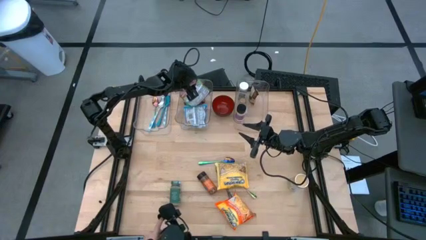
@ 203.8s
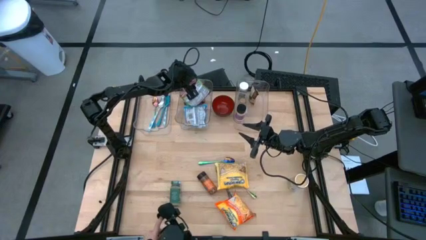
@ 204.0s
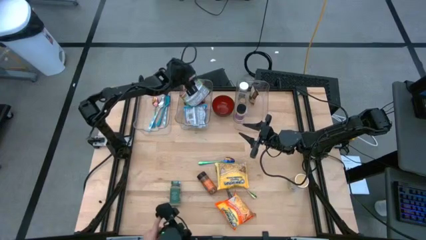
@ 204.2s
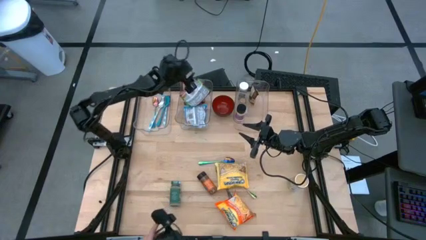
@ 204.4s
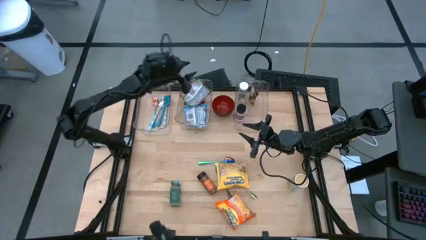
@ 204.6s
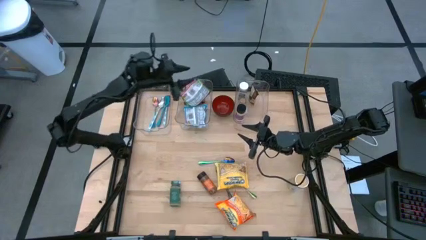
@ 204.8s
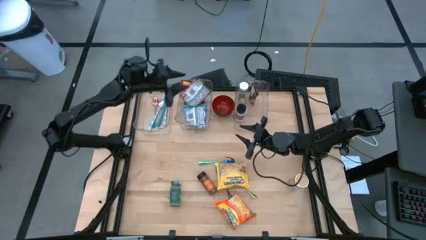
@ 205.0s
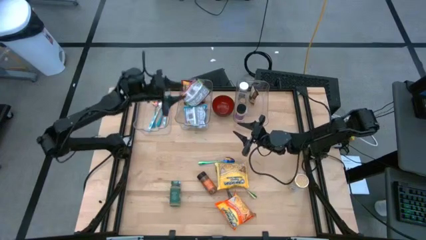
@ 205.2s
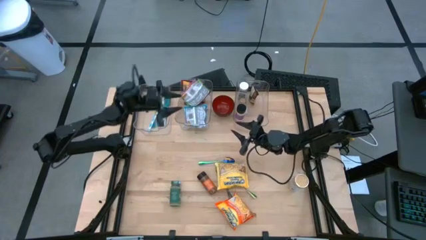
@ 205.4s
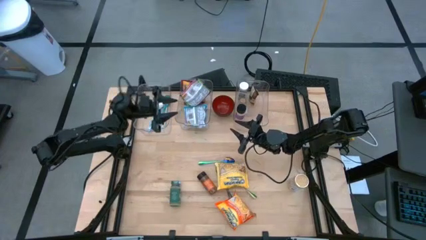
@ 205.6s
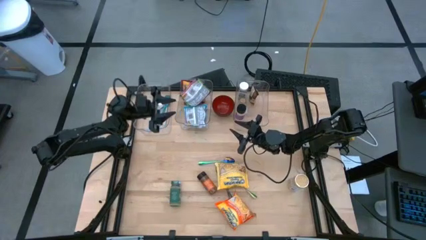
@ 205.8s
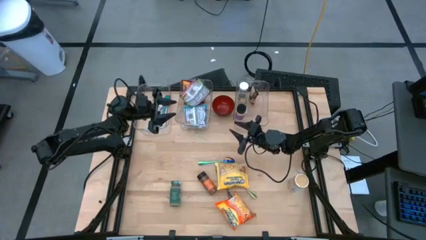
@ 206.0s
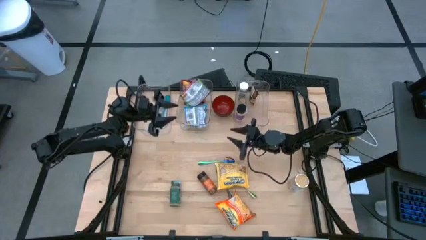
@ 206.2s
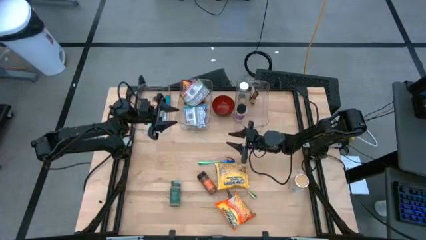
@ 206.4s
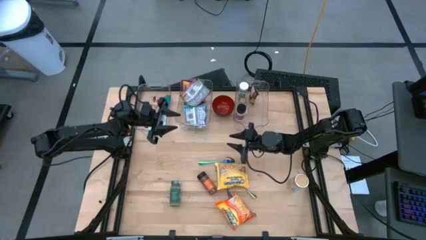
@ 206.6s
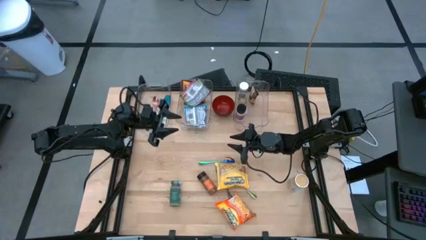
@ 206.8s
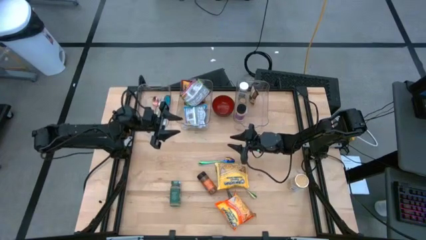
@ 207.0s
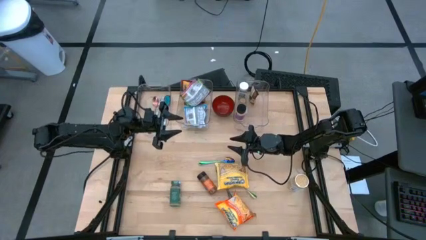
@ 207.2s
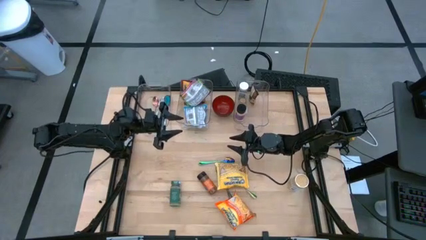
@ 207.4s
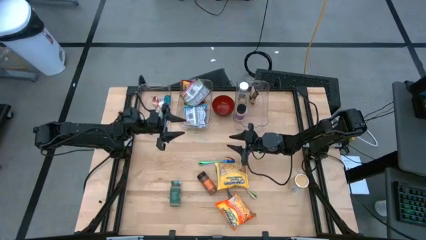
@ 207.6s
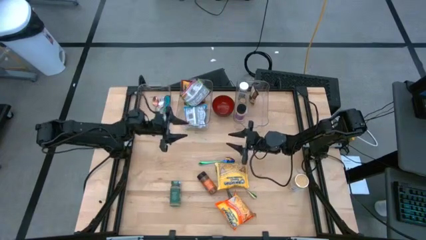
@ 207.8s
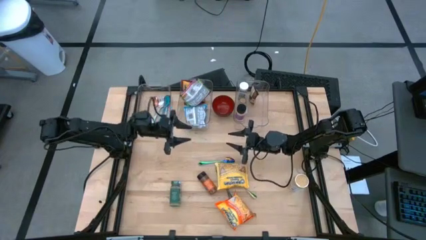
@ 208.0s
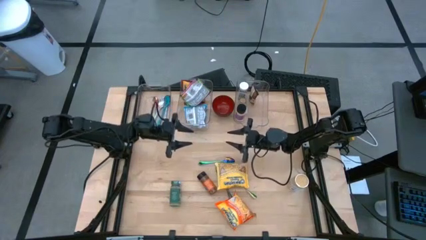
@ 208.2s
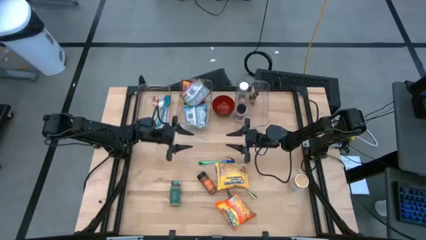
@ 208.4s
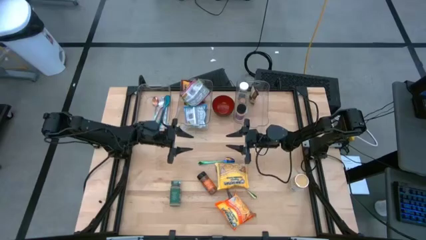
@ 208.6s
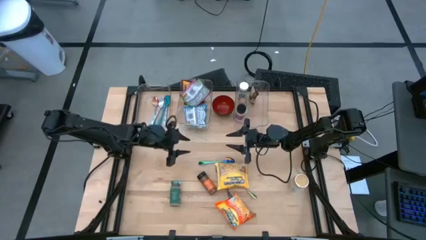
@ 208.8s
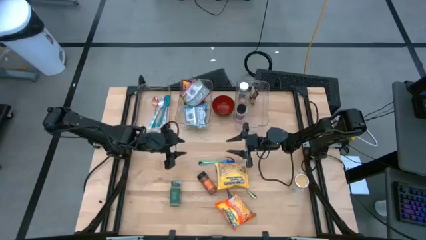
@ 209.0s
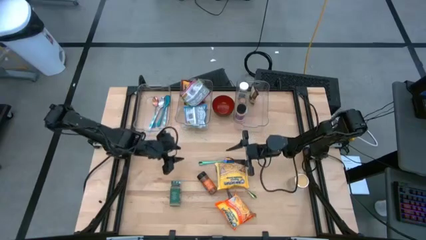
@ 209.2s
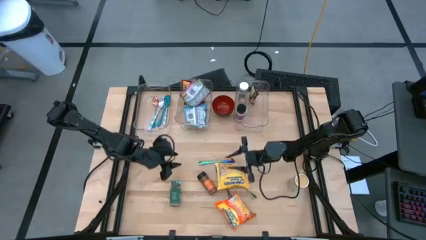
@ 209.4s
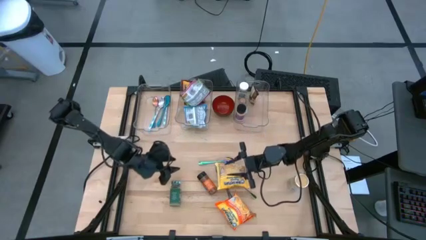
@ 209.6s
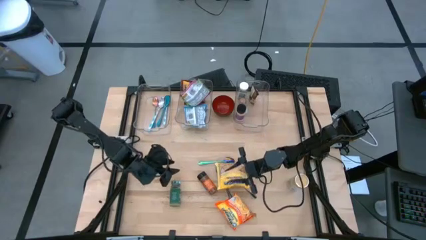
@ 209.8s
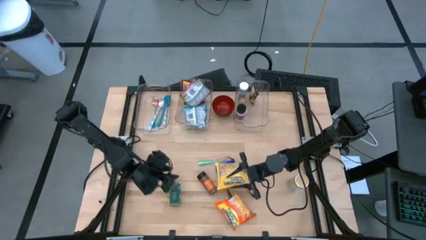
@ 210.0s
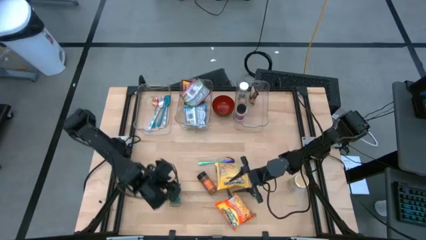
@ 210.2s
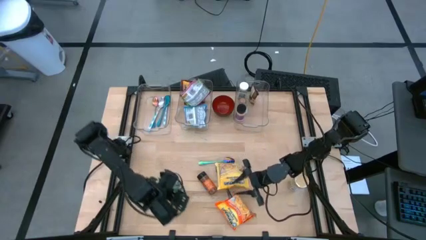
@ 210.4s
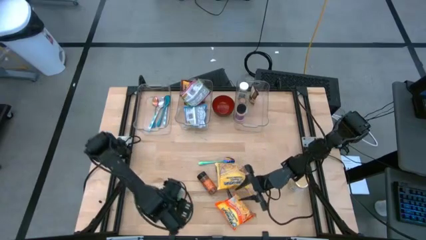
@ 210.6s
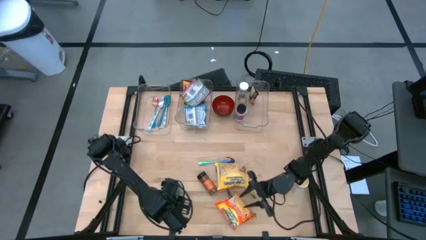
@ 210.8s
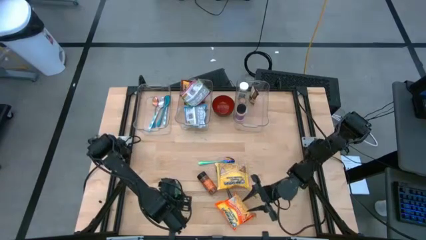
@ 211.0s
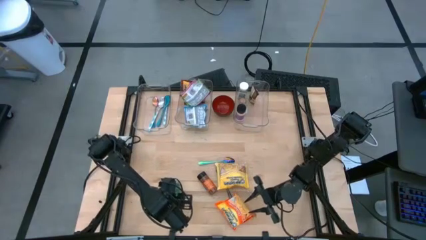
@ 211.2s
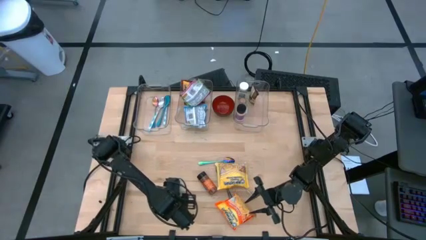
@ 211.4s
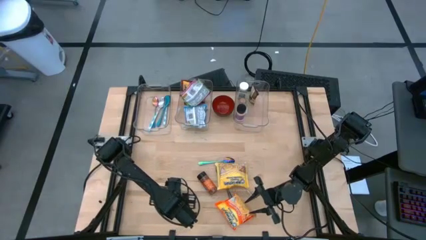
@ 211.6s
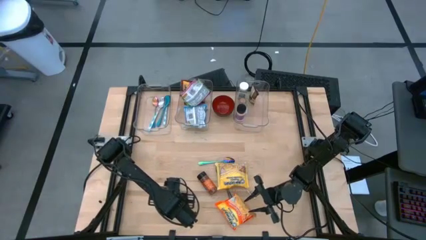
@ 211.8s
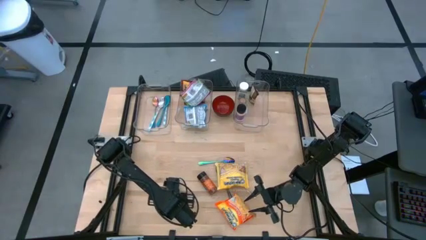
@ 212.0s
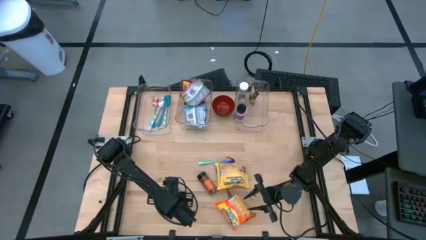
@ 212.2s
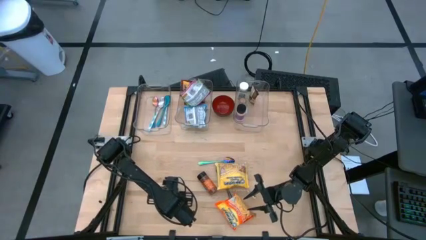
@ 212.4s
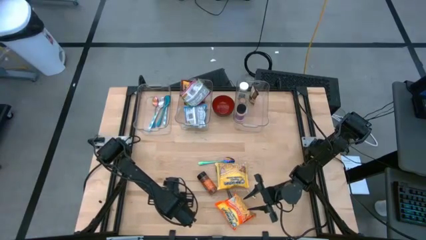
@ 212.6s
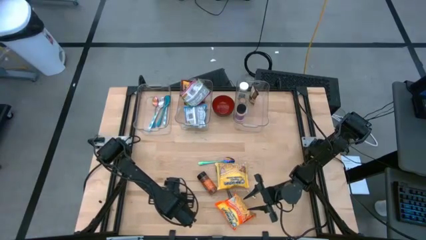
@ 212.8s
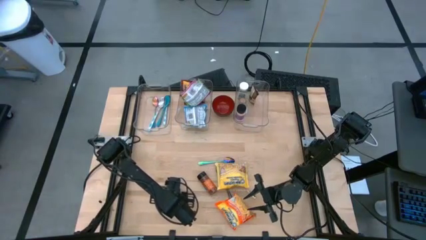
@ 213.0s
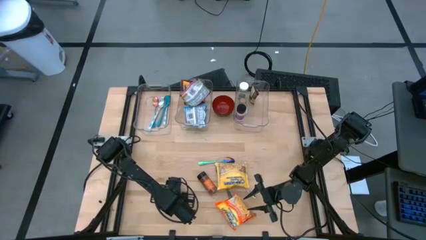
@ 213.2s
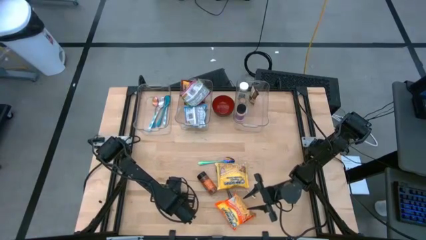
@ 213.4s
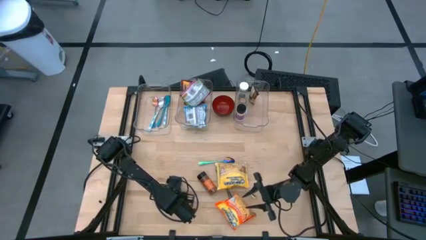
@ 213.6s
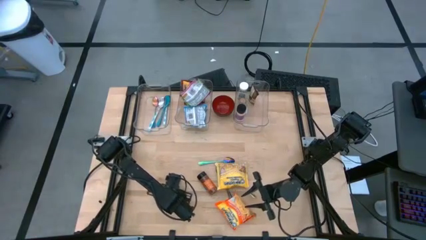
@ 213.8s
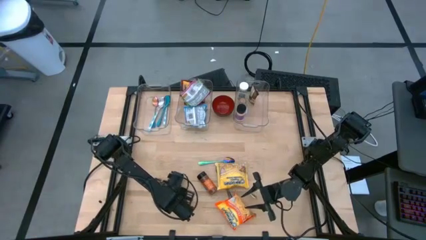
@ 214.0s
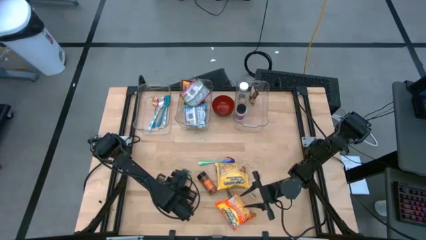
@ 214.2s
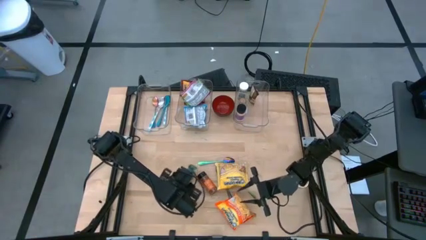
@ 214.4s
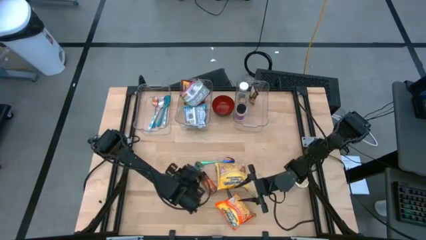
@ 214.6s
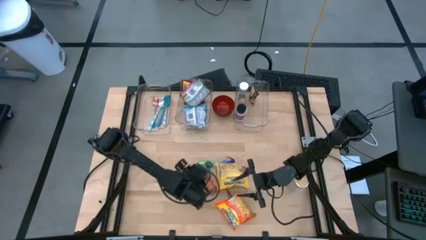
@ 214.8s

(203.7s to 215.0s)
Task: Pick & Place Food Item
Put the green seasoning bottle into the right transparent bin

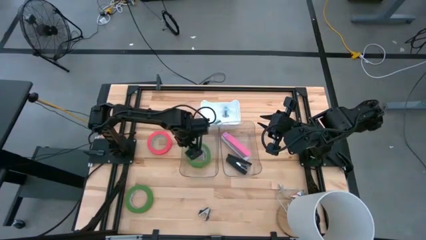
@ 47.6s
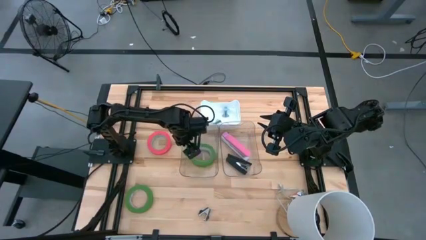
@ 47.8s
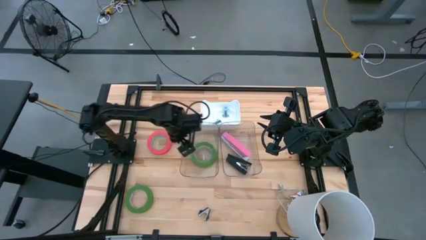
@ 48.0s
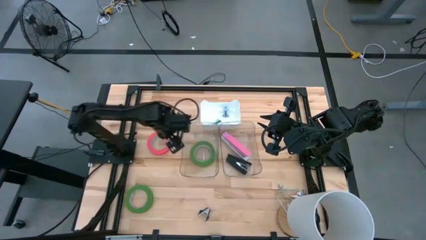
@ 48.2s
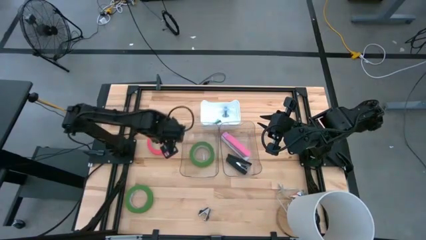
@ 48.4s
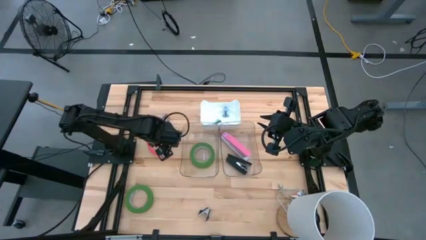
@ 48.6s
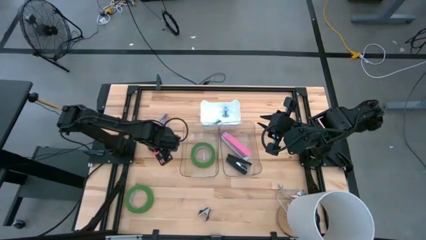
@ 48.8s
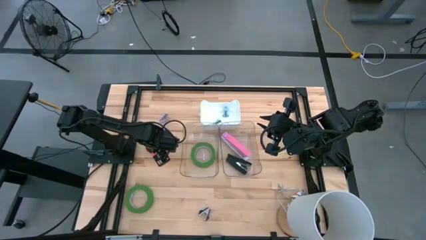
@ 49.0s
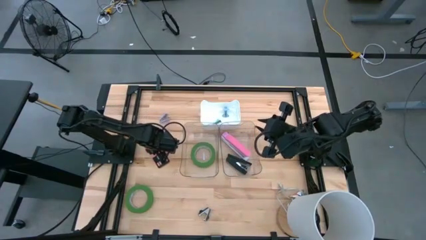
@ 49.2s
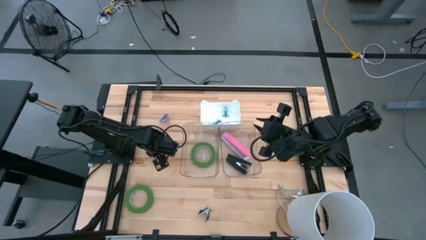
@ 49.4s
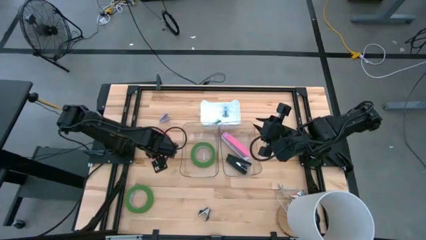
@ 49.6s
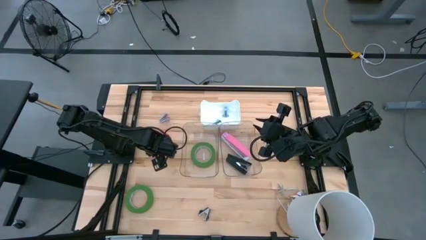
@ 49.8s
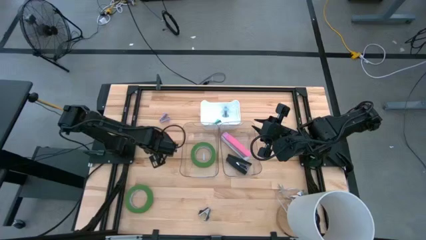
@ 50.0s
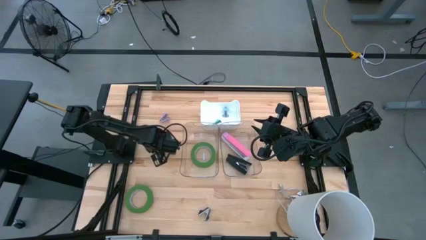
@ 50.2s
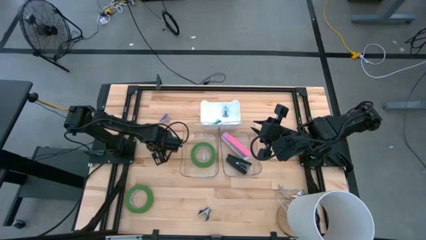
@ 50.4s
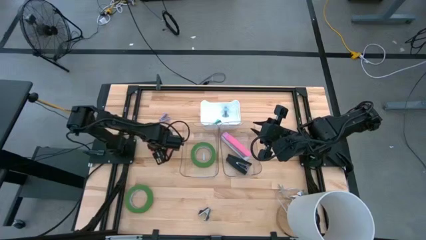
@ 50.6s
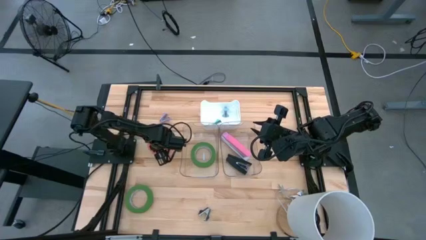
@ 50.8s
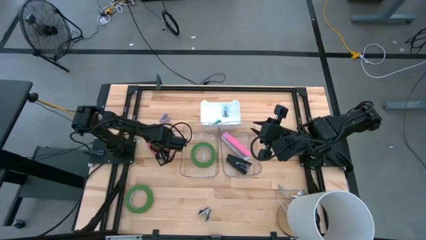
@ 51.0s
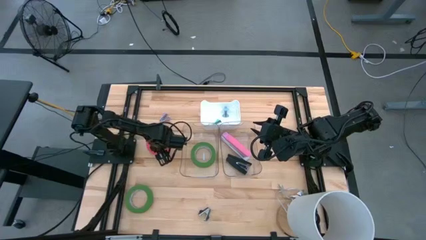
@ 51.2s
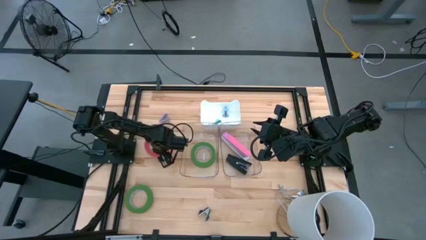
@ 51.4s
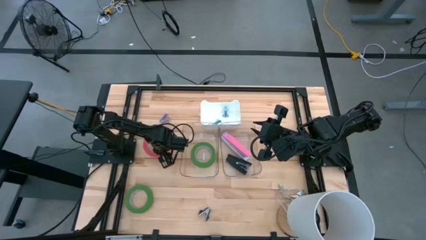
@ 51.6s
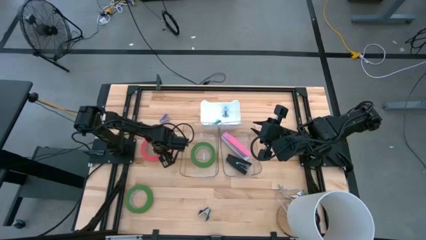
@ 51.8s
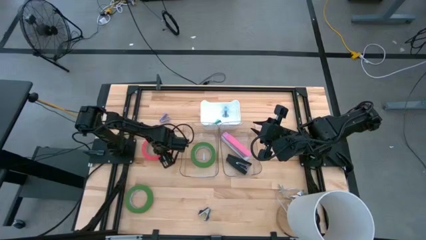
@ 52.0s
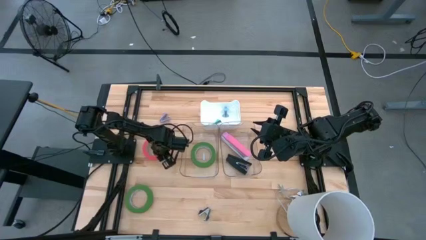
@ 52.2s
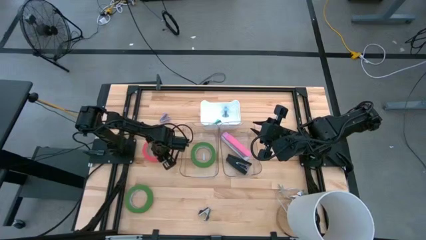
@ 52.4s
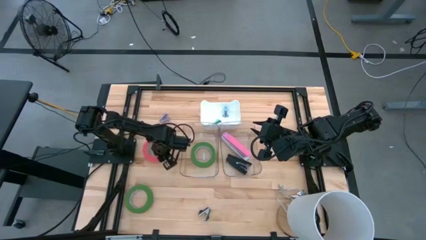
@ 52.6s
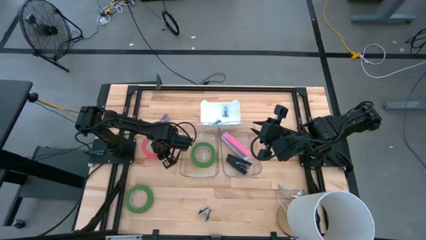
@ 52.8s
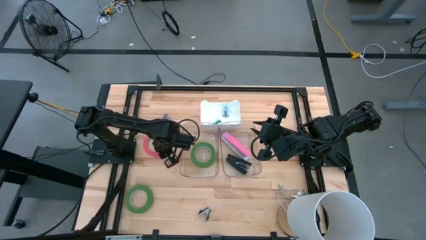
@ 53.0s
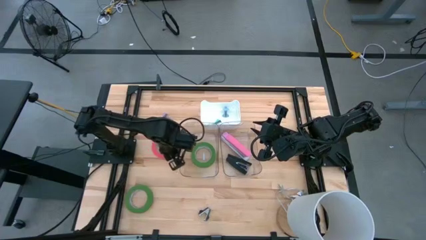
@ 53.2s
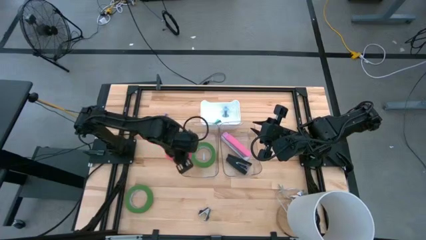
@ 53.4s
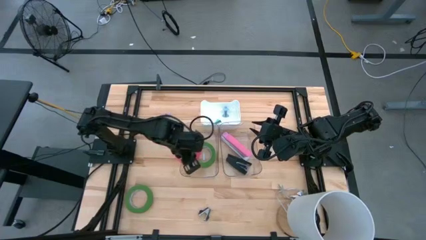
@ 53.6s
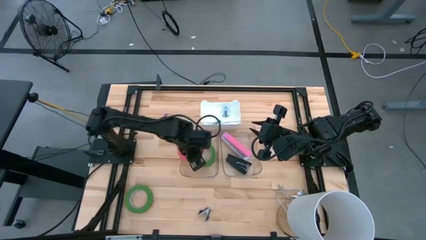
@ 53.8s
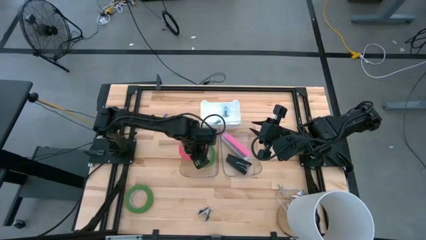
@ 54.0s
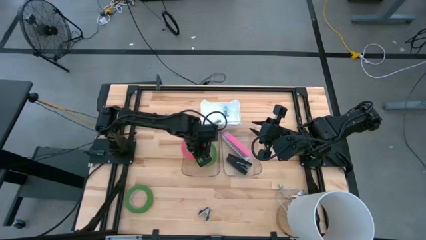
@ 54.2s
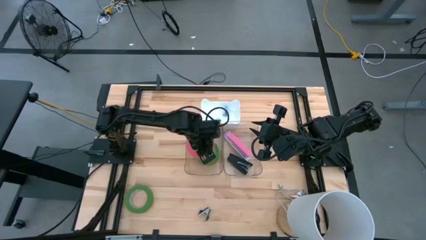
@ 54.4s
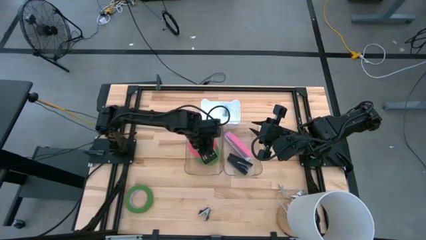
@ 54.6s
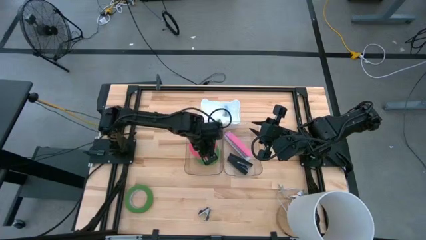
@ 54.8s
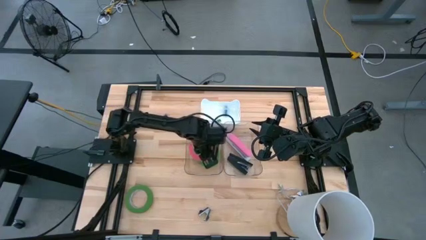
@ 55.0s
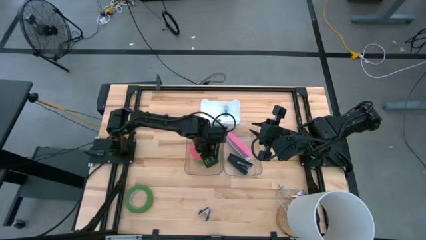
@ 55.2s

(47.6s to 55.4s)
Task: Pick and place Stapler, Stapler remover, tape
Put the pink tape into the left transparent bin
